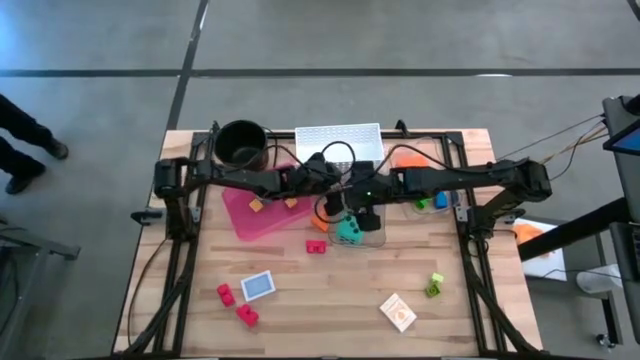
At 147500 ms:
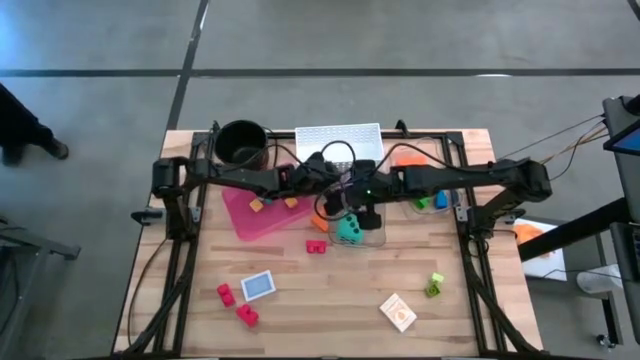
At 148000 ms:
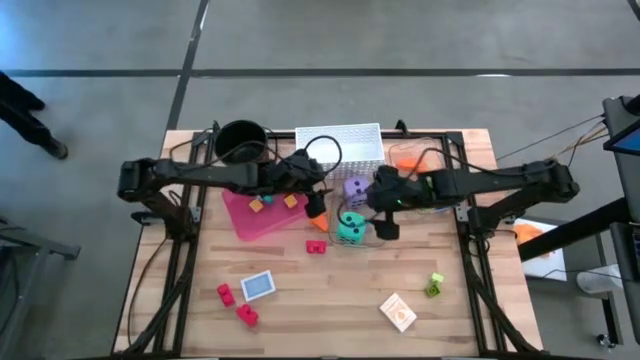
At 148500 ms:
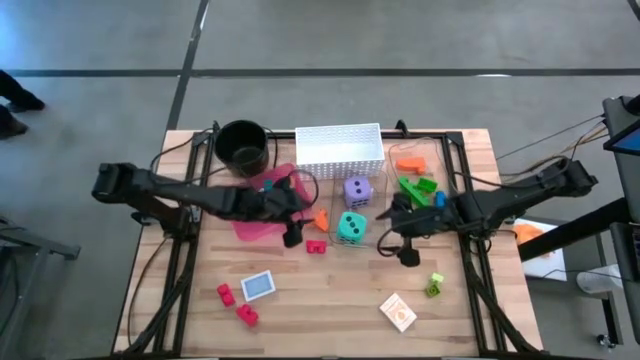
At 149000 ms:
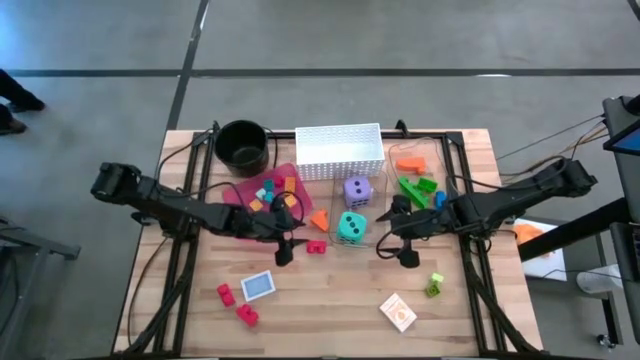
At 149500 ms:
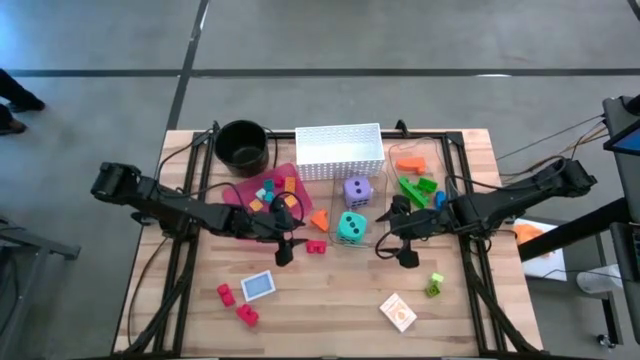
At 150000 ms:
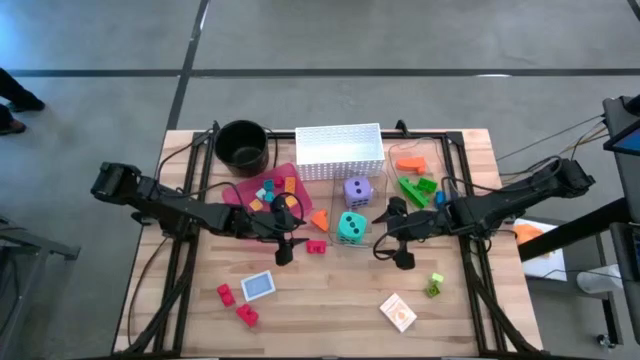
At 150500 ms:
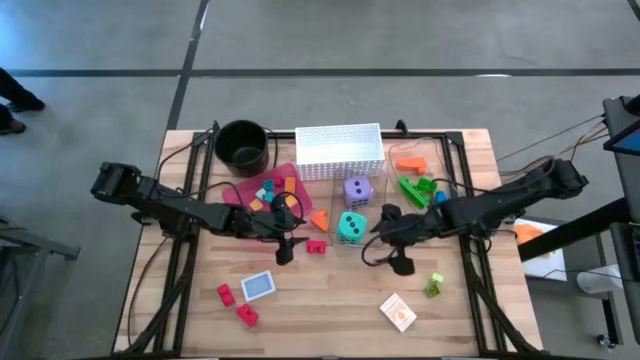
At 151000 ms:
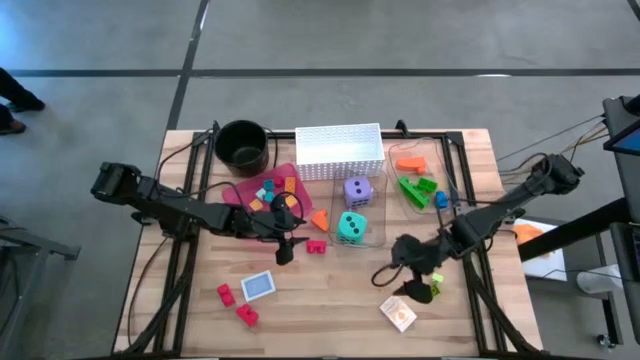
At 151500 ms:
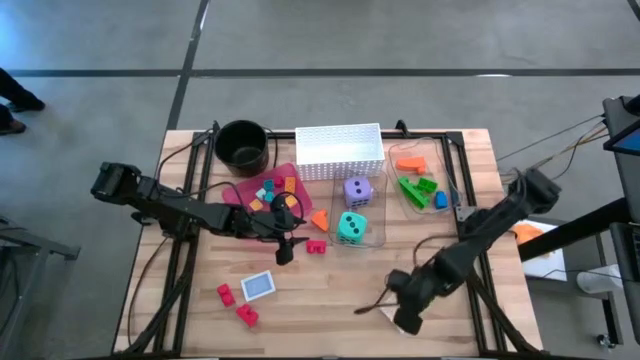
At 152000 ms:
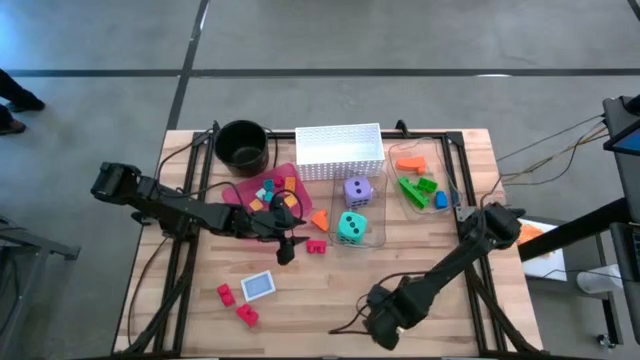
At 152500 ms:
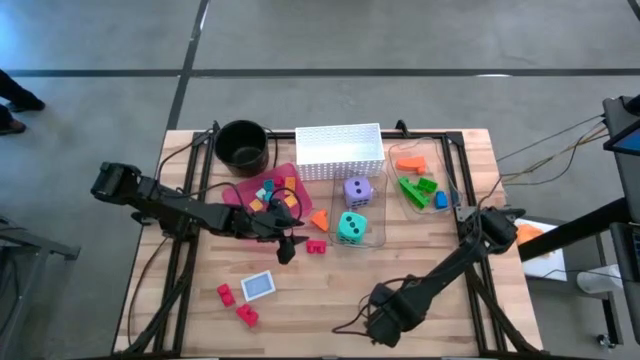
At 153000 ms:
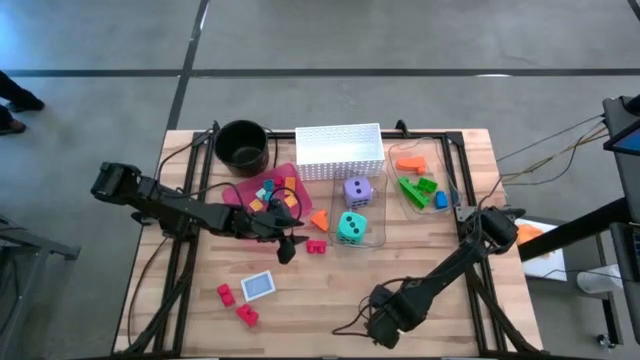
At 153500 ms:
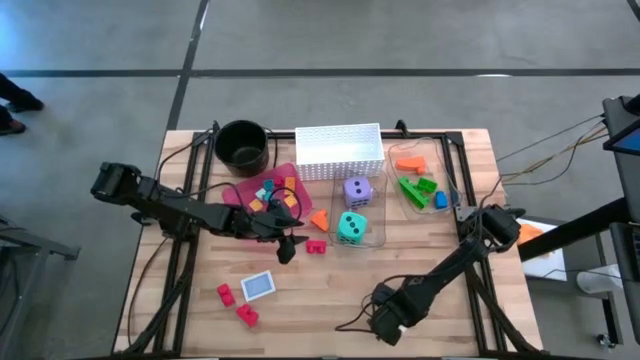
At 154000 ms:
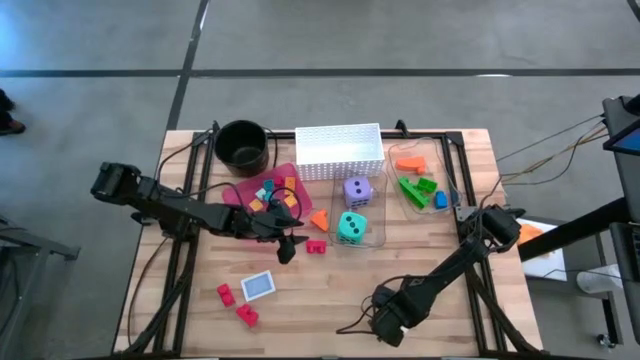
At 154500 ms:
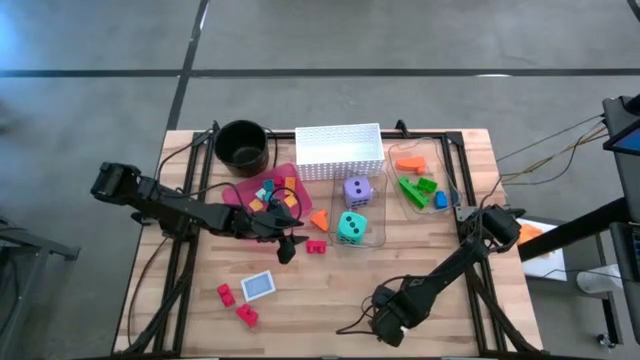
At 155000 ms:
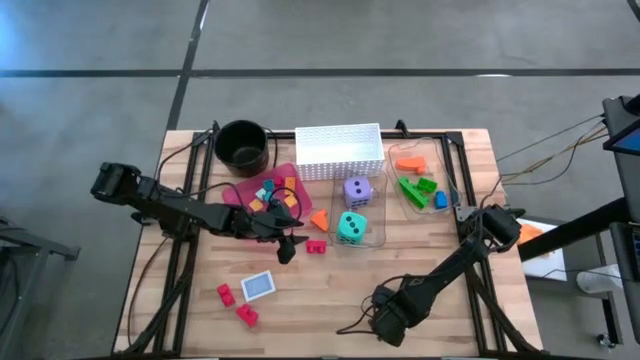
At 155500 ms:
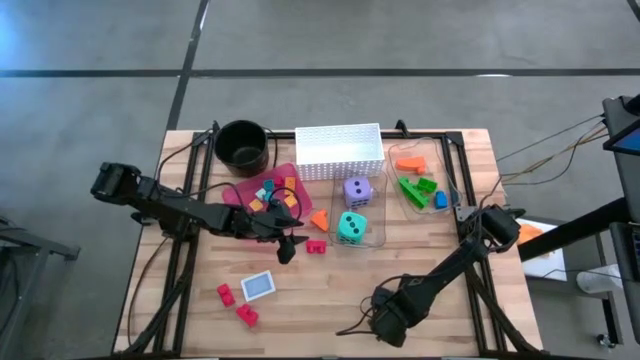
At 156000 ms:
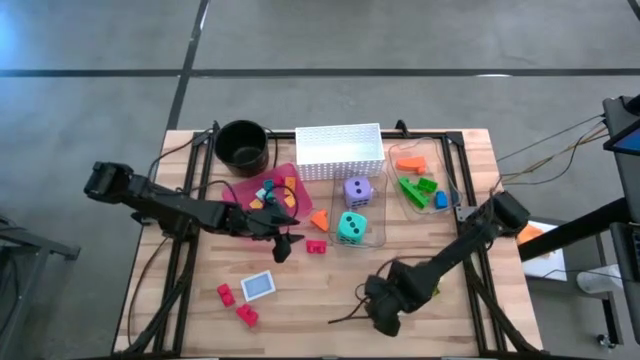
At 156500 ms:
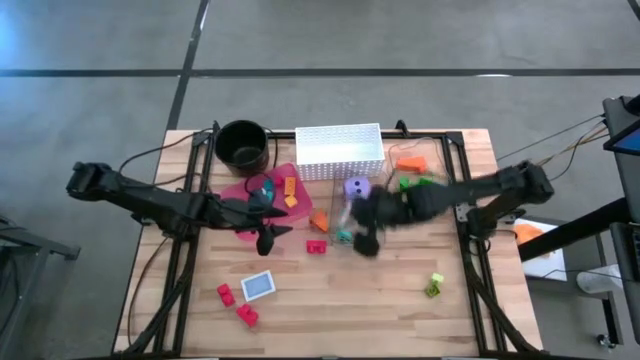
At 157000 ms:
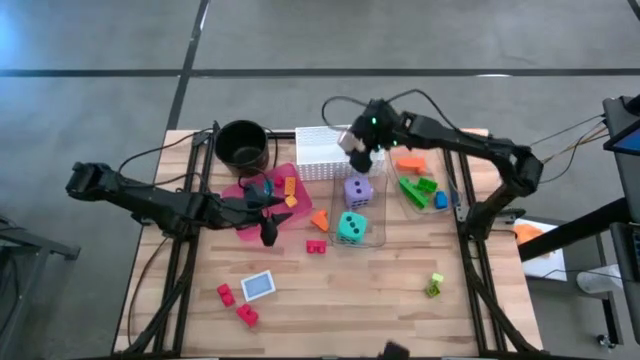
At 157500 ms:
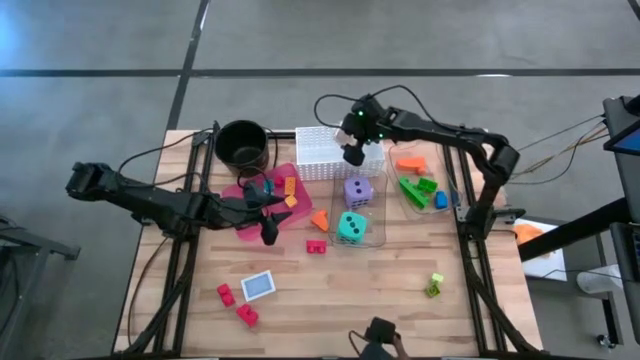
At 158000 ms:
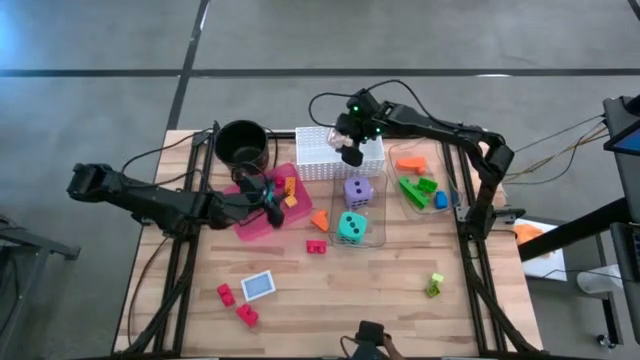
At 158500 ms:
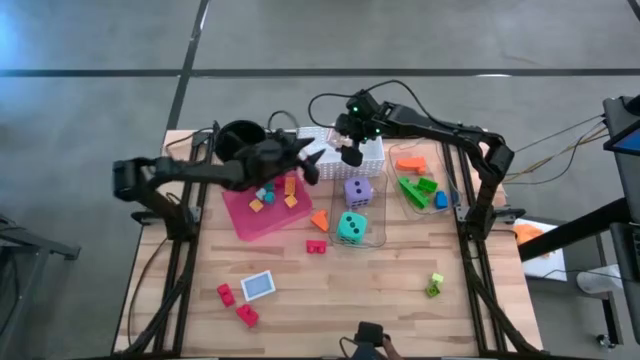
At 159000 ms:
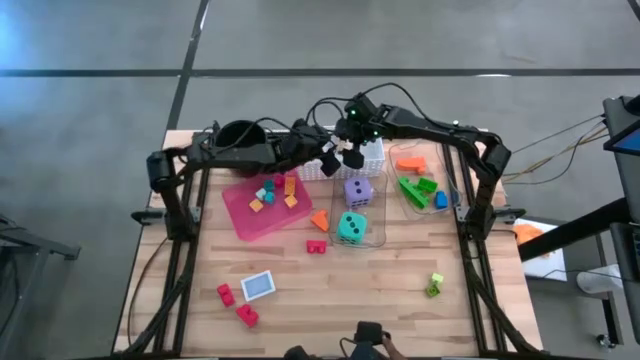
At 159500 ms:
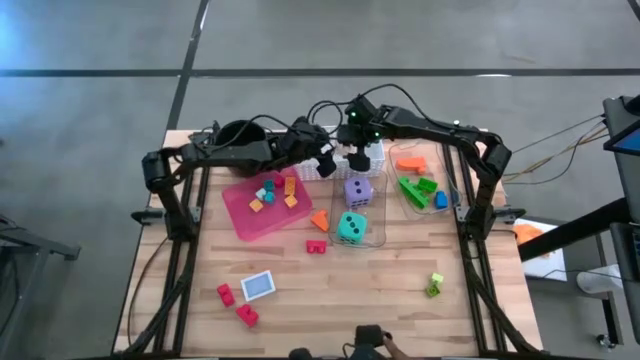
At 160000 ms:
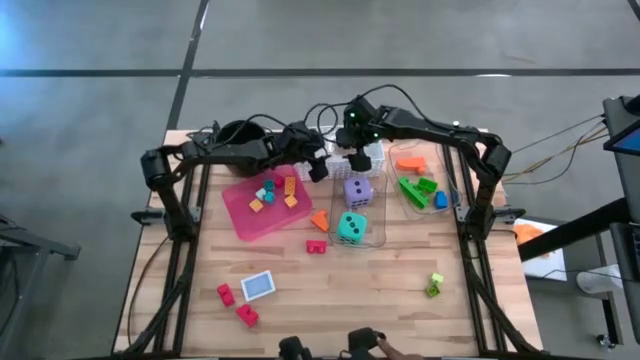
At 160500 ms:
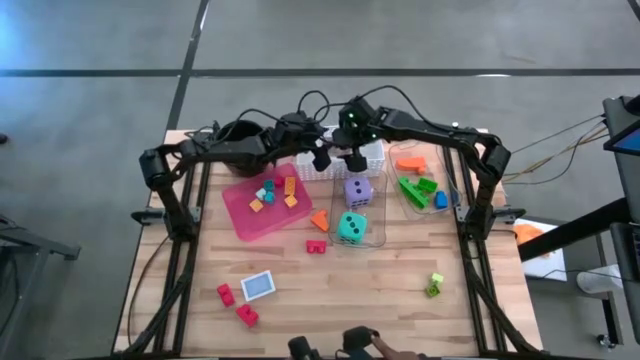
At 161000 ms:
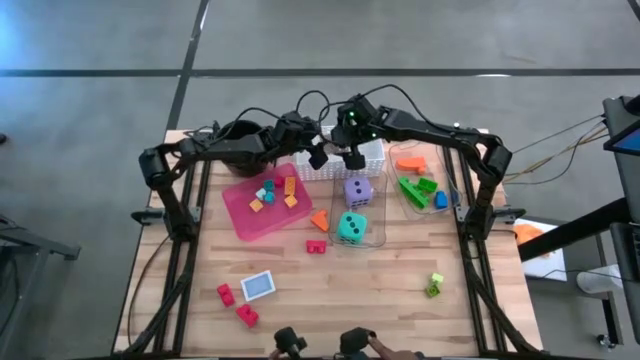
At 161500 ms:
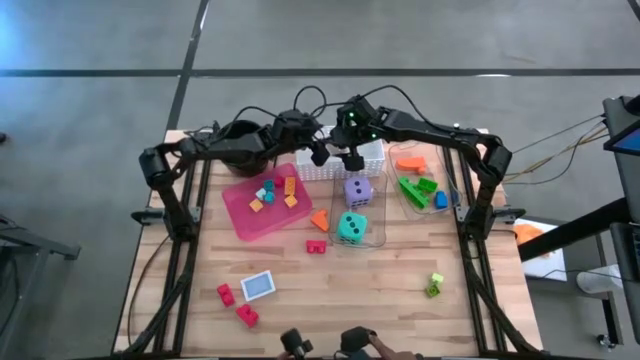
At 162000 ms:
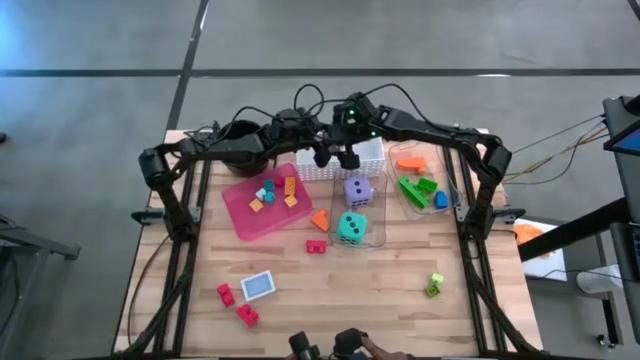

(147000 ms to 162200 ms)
Task: Pick & Place Toys
Put the yellow playing card box into the white bin

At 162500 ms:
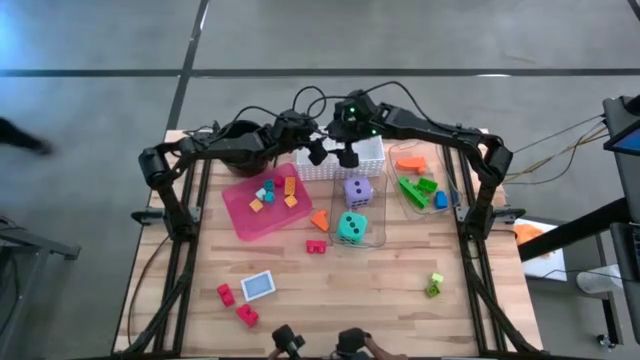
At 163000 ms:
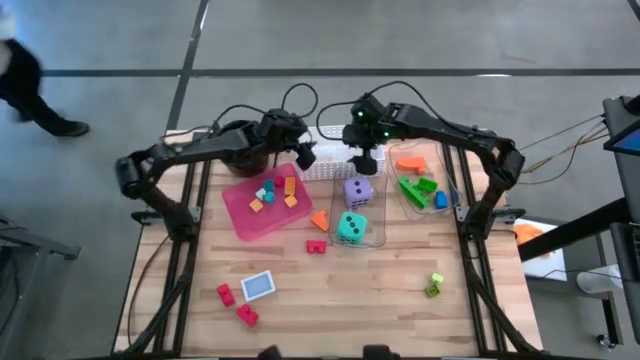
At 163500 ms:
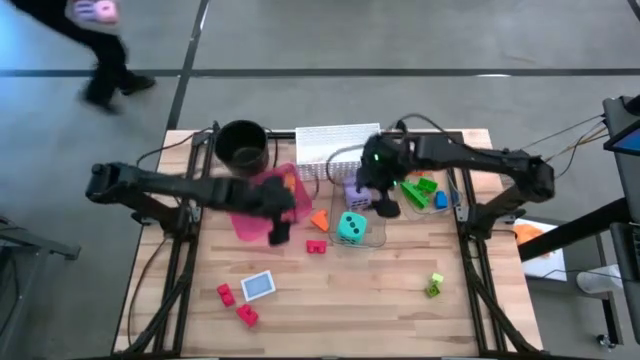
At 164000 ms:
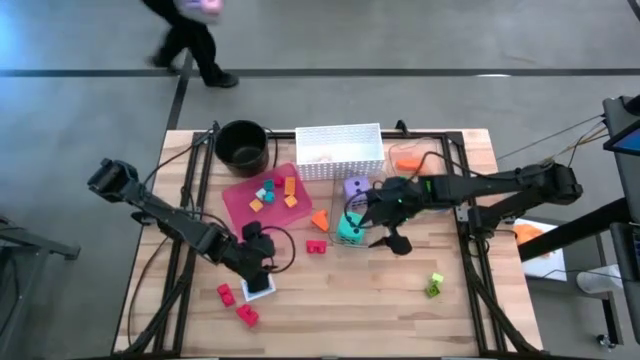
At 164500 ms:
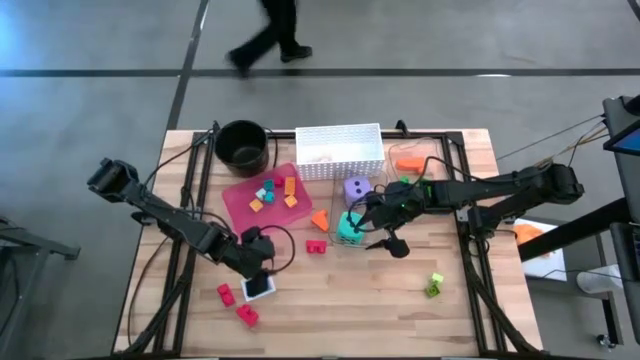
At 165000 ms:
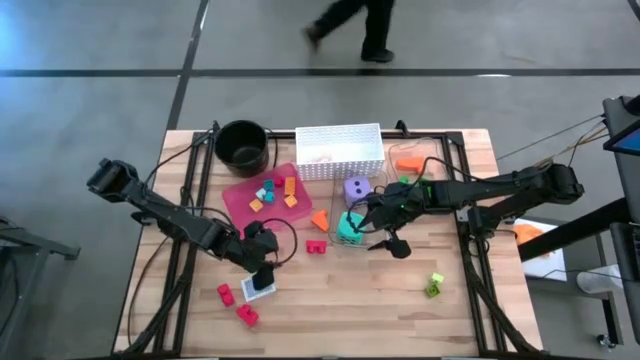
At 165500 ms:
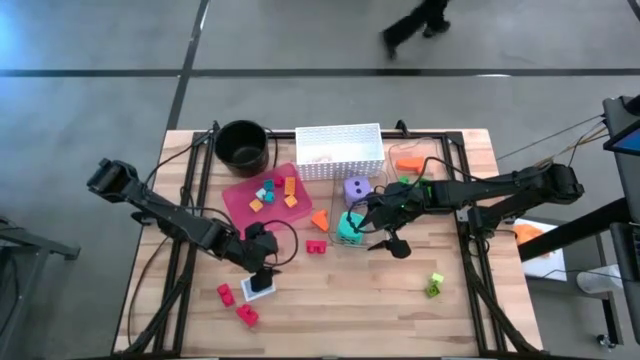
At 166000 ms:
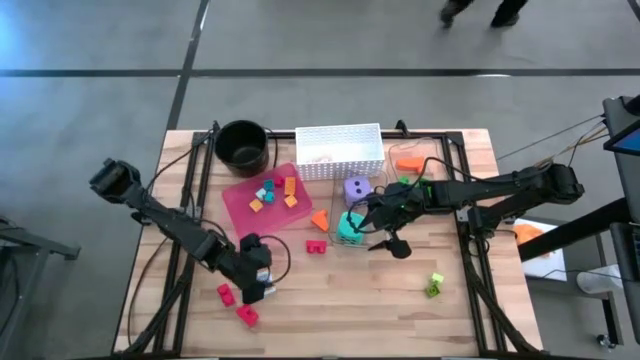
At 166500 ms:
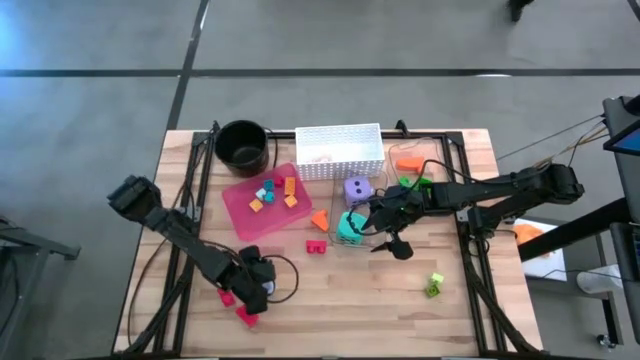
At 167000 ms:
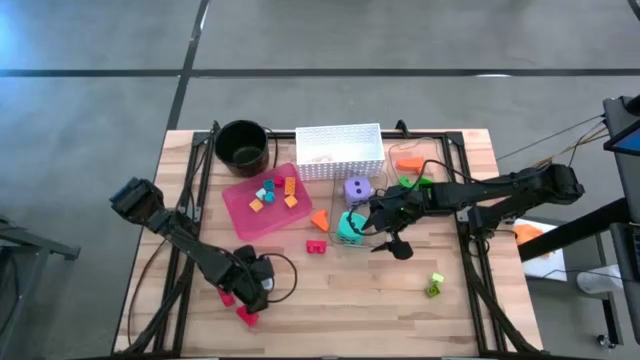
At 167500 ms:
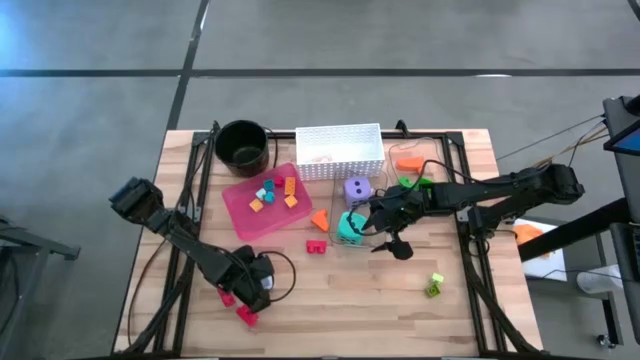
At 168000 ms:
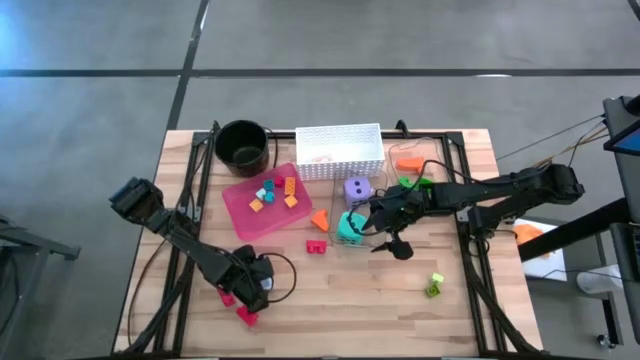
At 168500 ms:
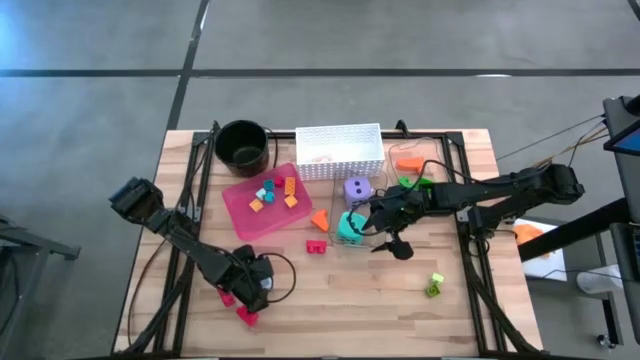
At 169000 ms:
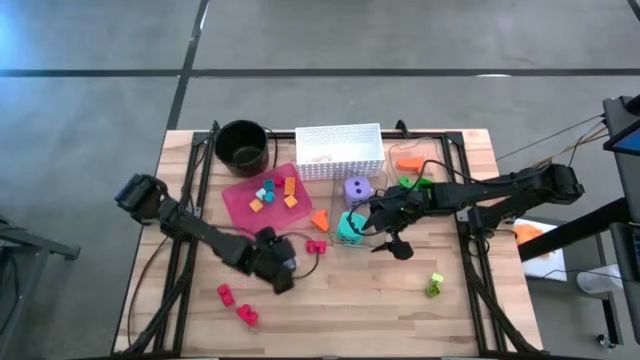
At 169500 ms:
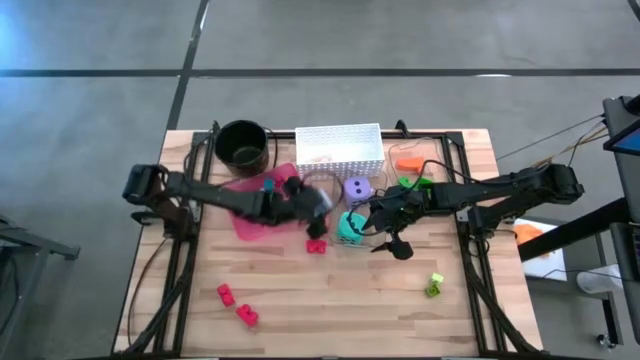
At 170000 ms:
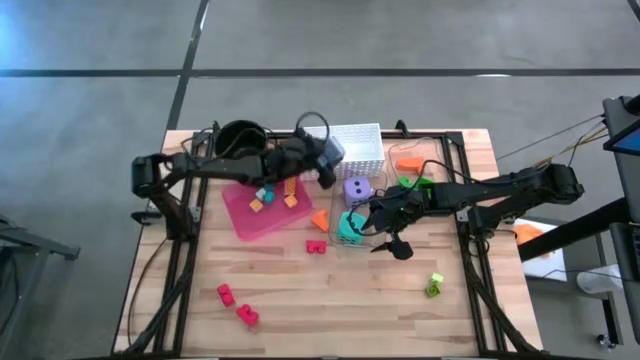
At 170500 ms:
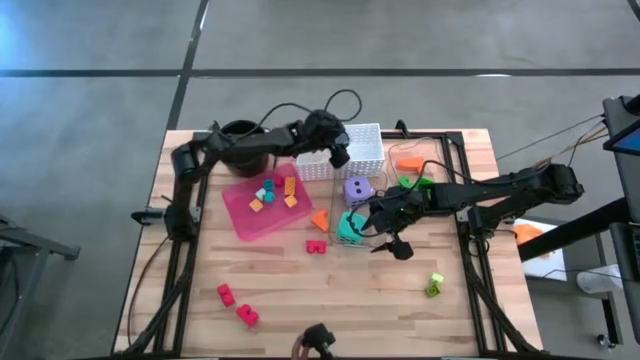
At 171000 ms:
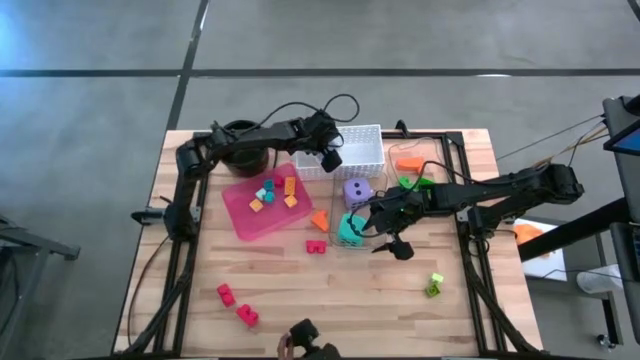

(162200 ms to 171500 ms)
Put the blue playing card box into the white bin
